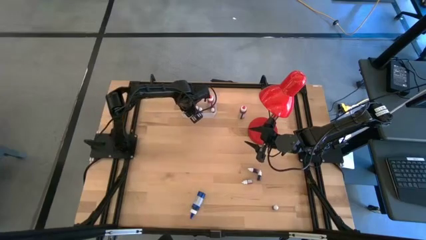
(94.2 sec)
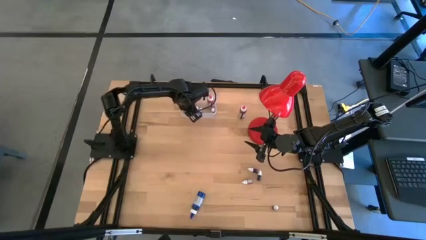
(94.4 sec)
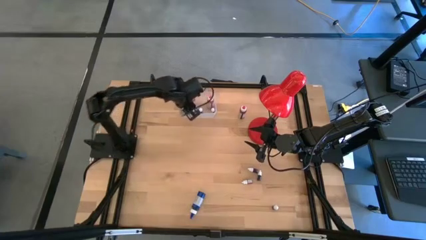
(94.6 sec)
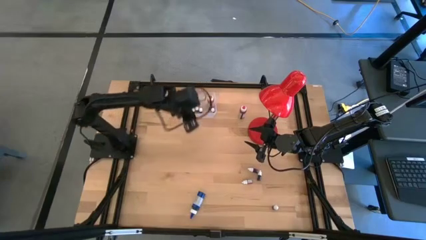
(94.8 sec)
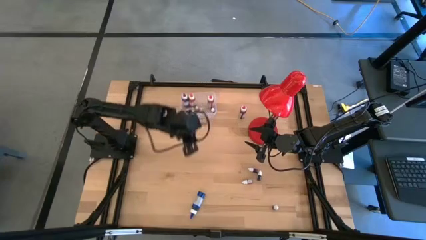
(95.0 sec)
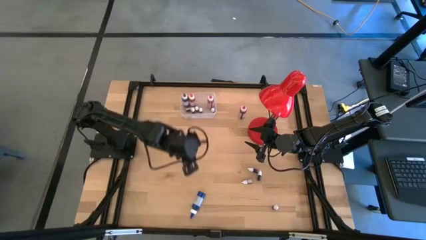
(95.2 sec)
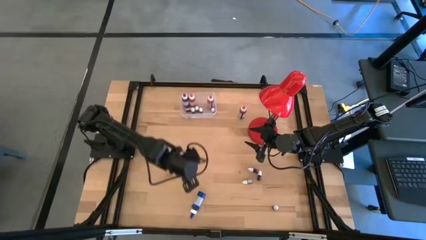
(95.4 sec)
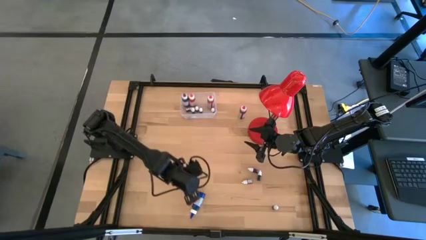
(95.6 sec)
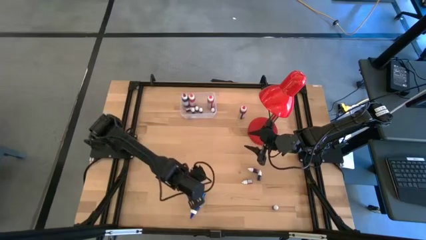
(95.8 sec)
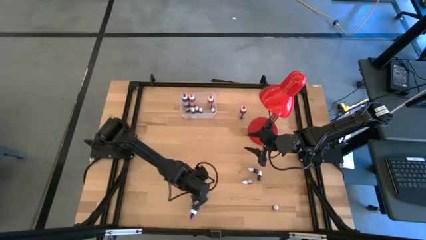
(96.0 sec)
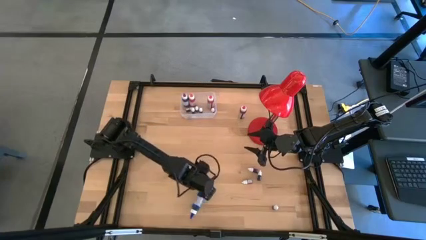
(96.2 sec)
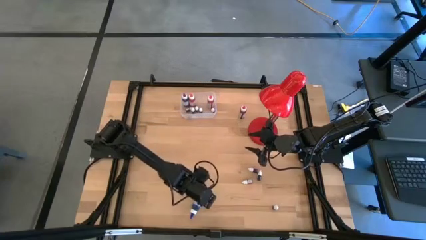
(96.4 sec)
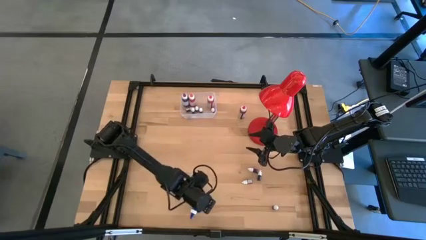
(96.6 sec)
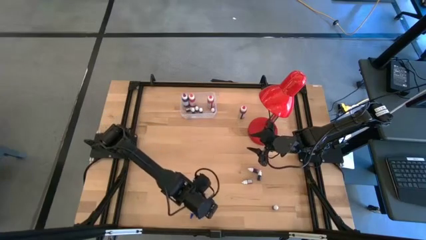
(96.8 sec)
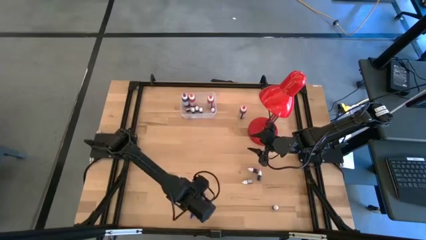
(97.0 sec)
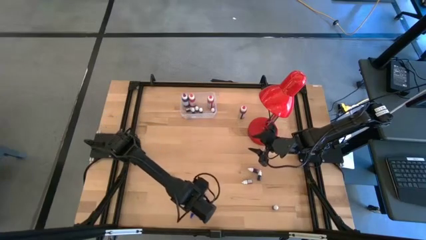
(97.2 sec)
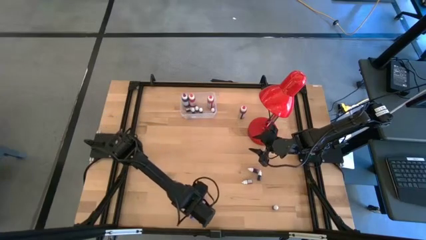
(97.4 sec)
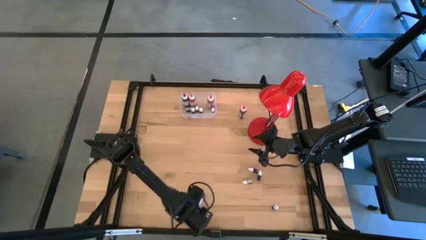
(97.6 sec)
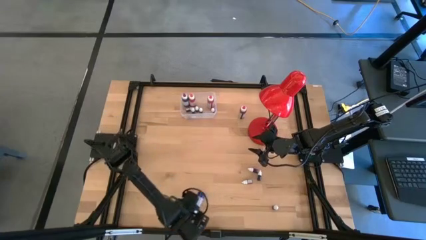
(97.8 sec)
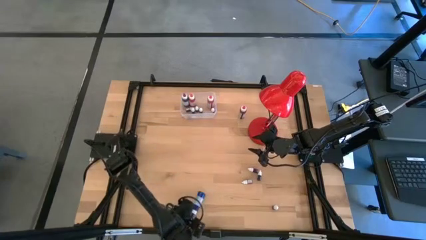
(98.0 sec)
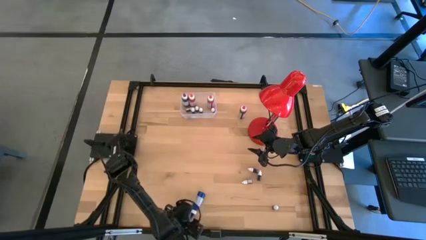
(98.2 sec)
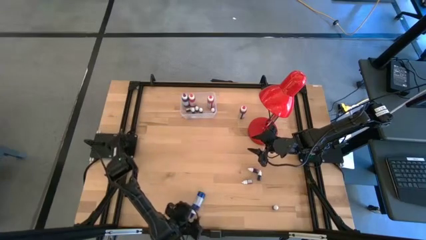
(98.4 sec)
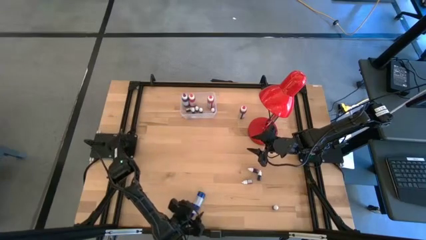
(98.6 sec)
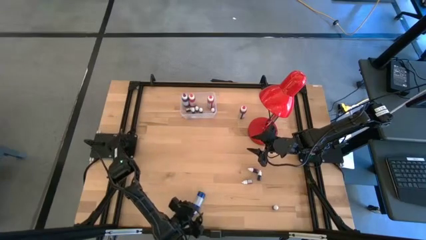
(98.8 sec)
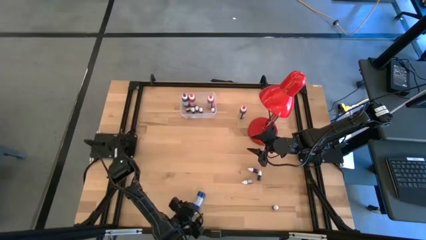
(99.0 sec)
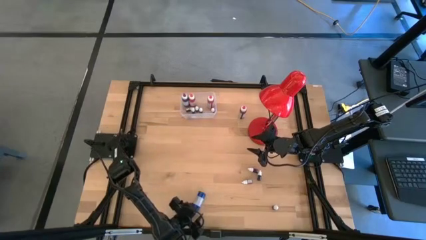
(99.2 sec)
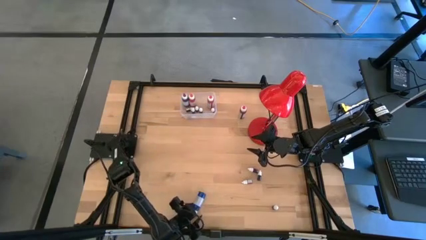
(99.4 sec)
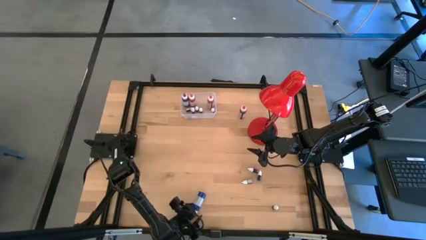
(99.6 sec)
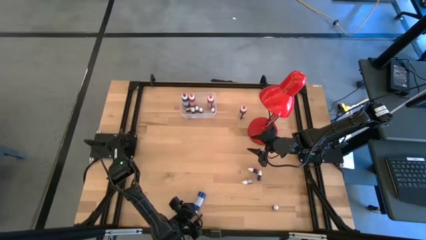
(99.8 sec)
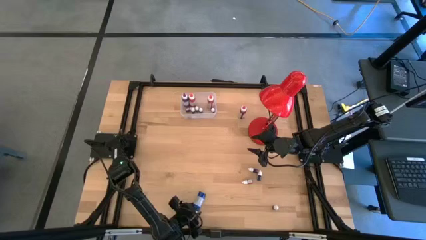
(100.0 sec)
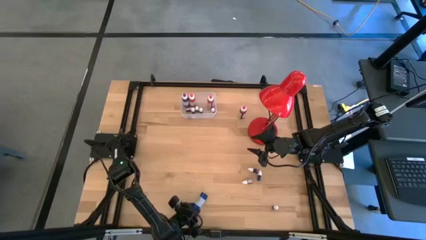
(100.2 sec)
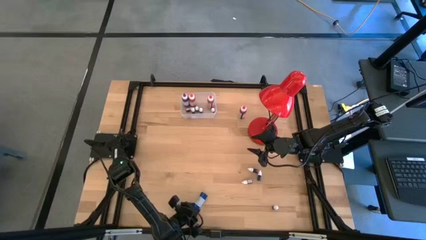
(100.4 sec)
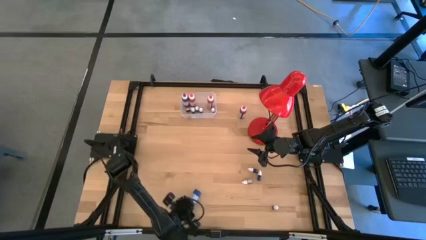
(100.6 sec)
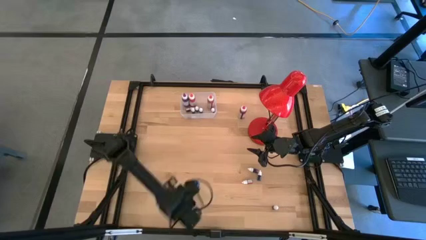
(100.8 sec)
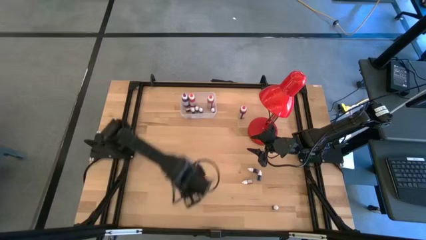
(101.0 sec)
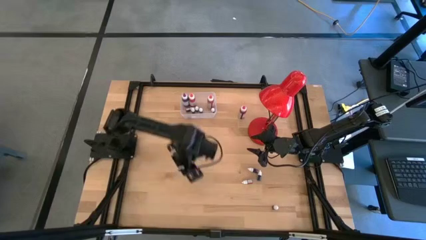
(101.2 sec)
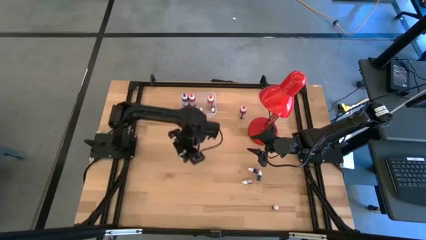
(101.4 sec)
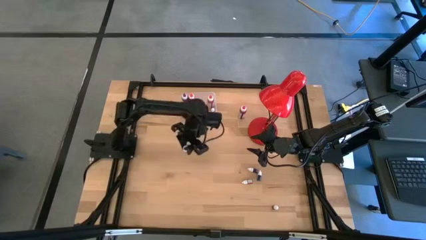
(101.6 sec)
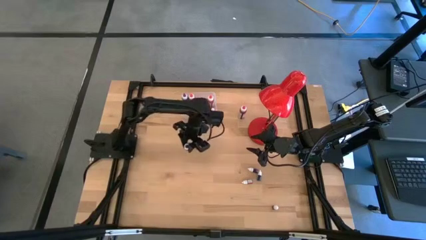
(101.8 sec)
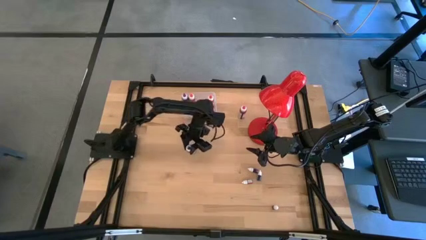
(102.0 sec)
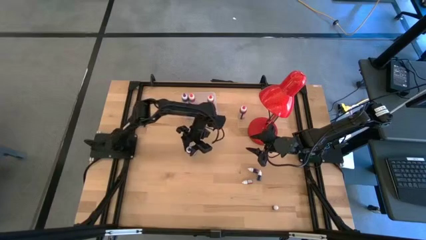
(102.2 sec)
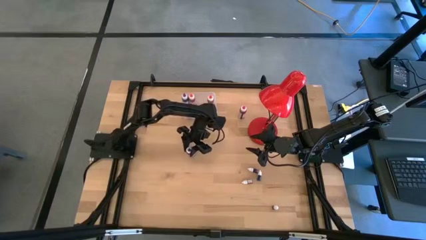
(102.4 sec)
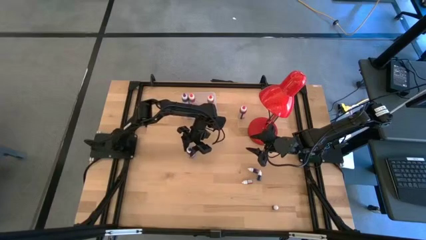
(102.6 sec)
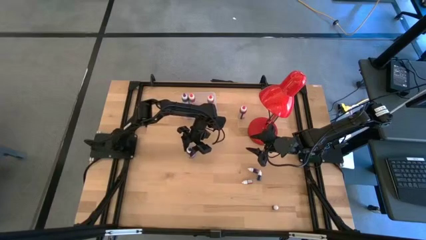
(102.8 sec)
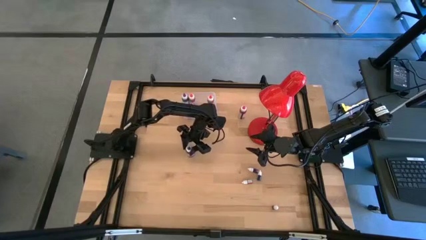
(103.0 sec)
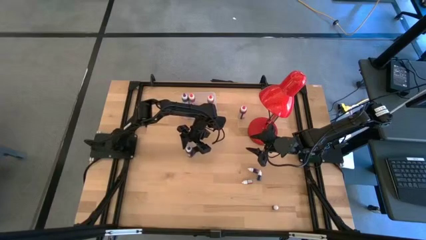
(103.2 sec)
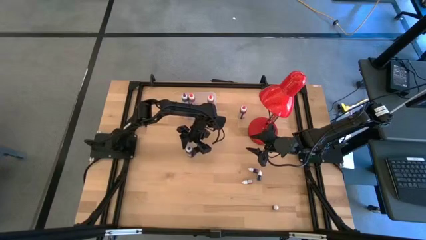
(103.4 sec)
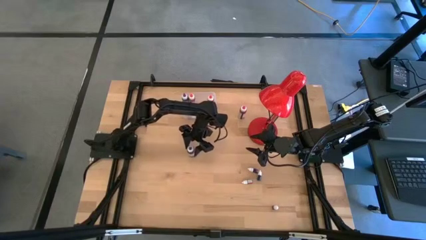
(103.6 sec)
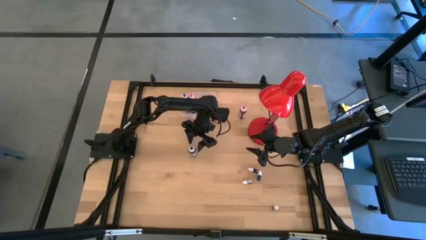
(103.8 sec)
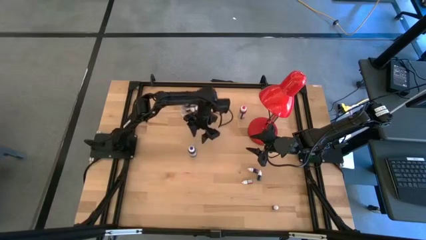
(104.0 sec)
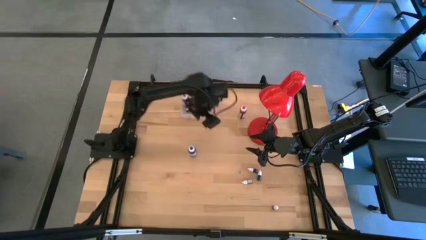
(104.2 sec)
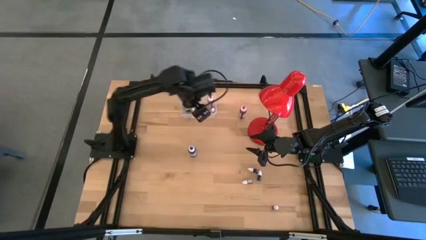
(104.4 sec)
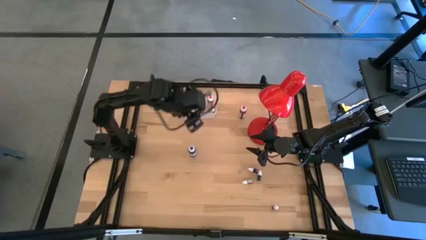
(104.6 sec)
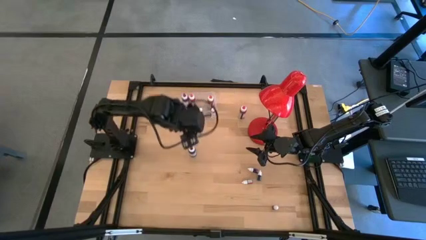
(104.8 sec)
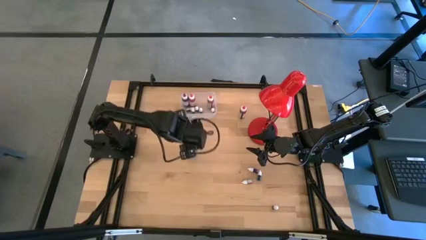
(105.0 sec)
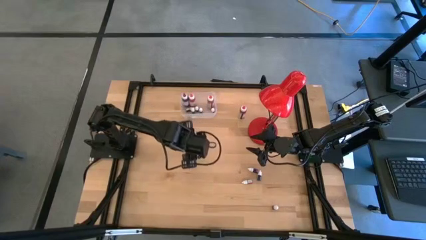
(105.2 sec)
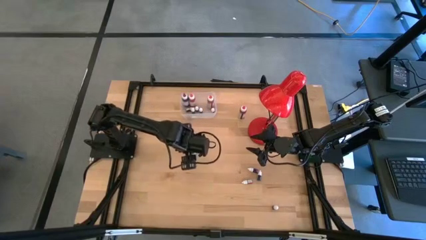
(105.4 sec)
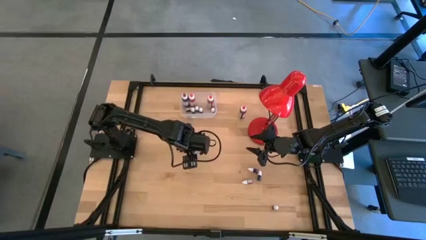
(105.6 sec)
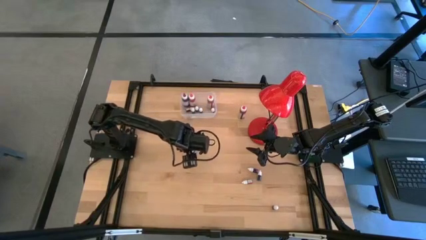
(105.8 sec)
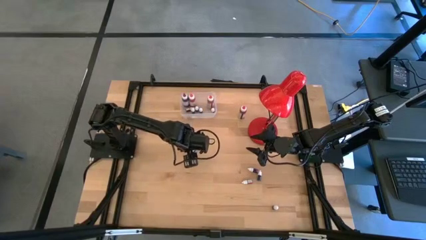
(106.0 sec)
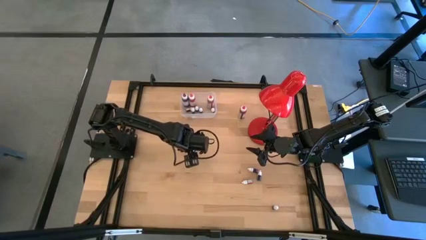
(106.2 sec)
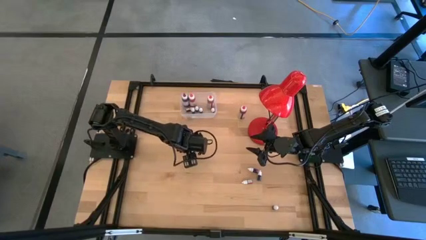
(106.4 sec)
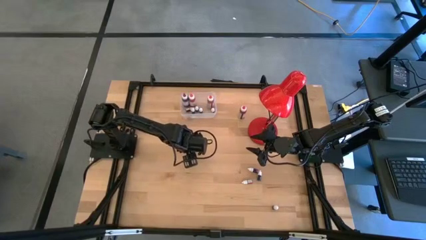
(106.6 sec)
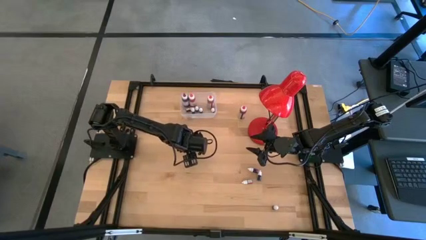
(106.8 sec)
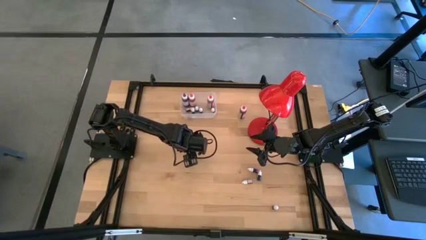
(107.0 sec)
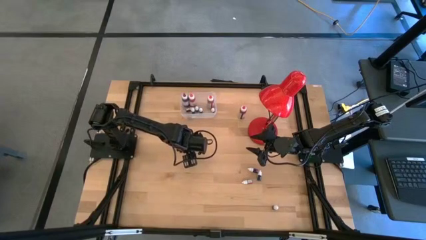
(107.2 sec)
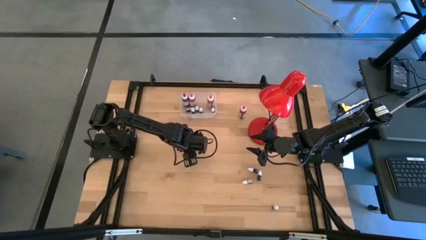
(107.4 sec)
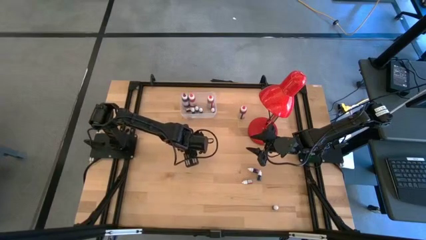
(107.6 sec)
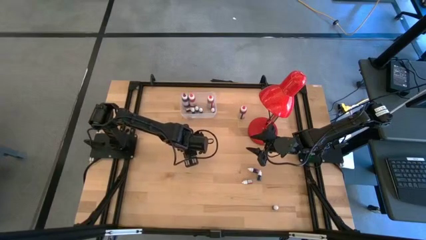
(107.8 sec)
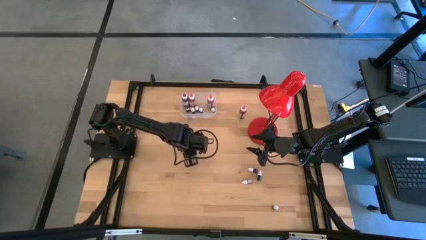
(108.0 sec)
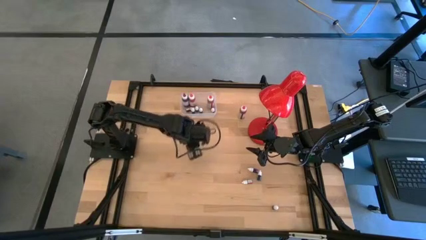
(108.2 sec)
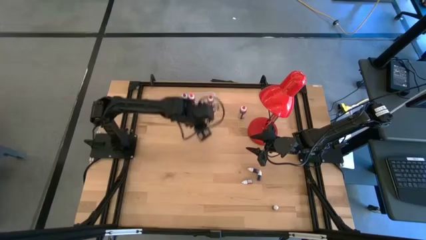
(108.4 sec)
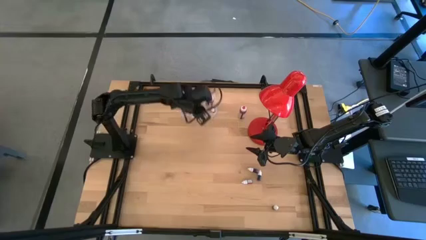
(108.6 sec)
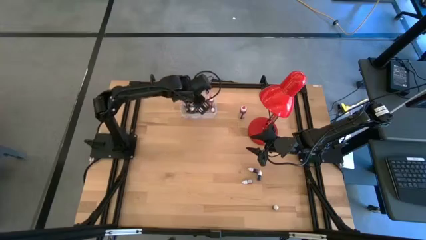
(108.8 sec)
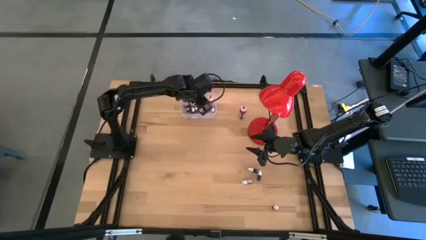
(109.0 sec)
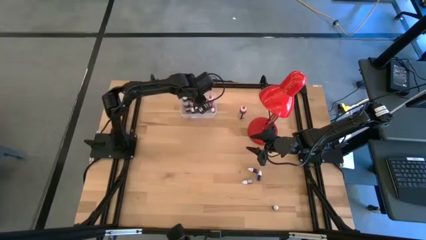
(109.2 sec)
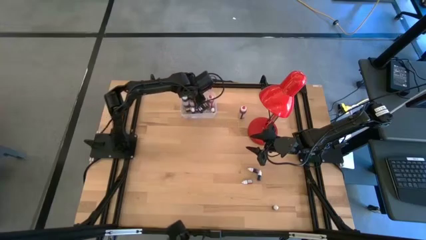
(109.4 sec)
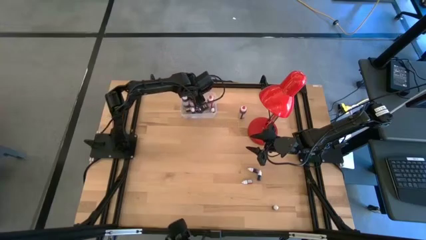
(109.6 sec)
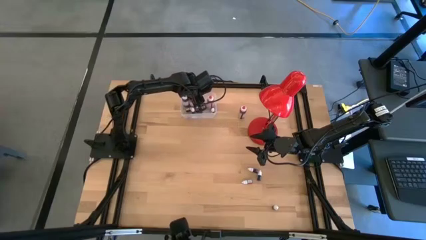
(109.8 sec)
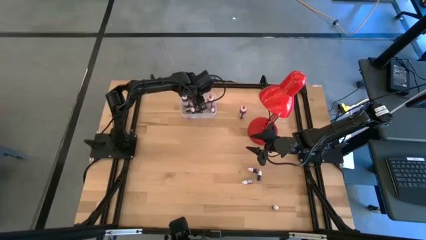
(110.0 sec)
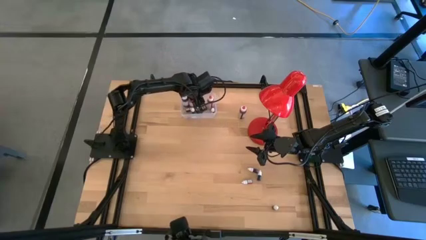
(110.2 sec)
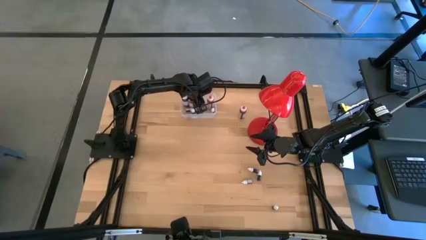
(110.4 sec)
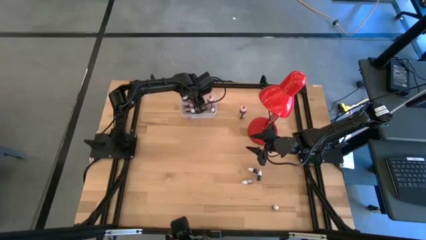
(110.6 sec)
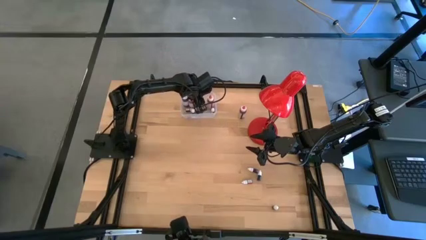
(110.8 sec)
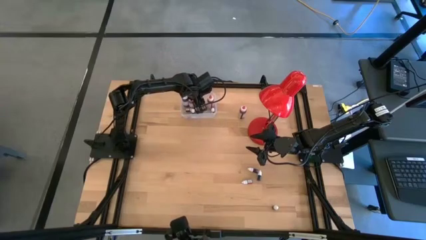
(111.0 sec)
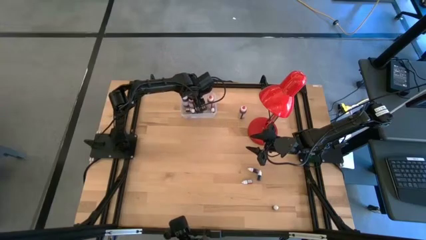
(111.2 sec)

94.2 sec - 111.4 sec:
Task: Pick & Place food coloring
Put the large blue food coloring bottle into the transparent bin
